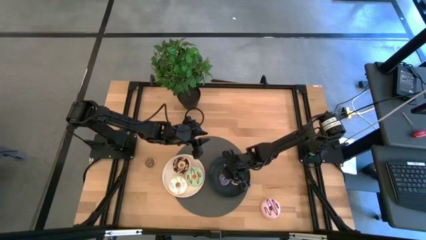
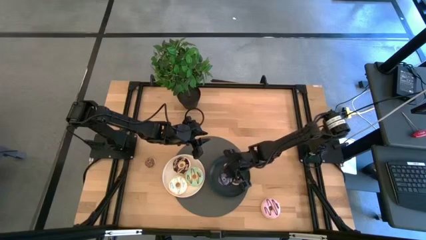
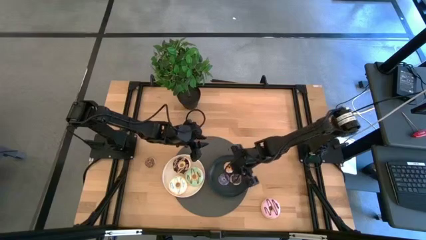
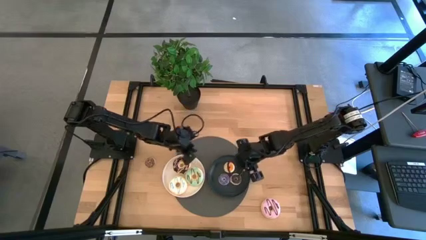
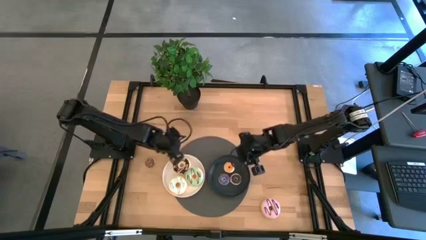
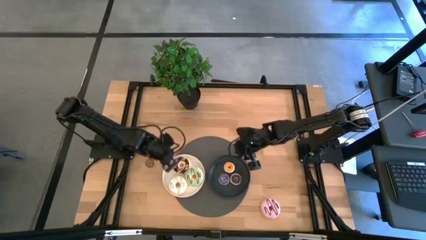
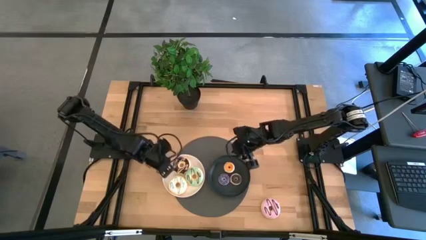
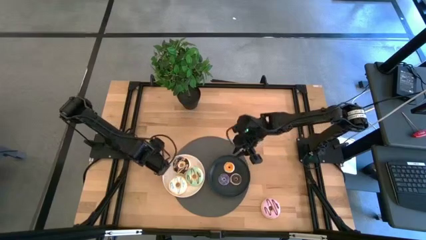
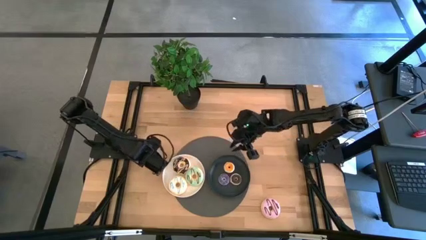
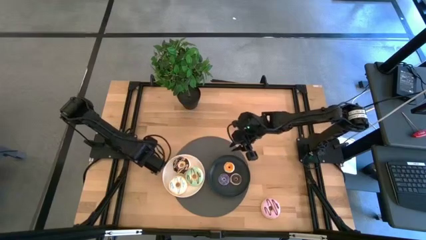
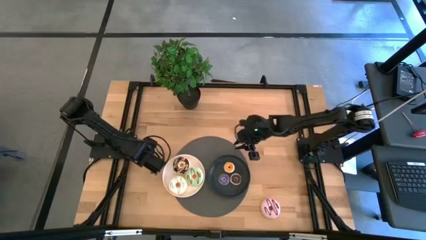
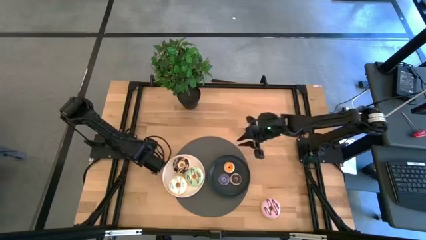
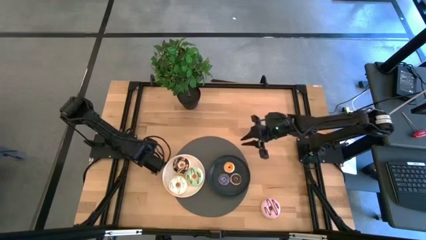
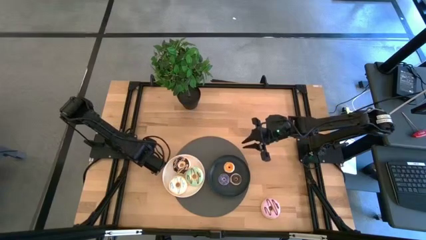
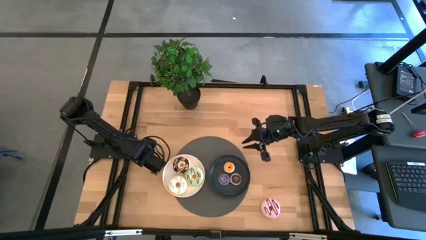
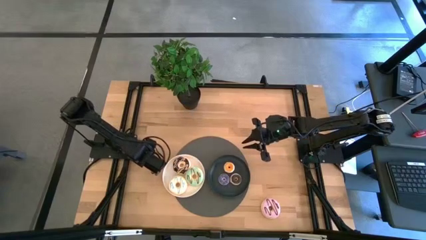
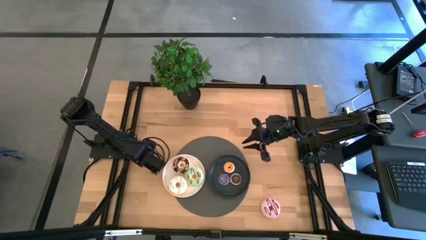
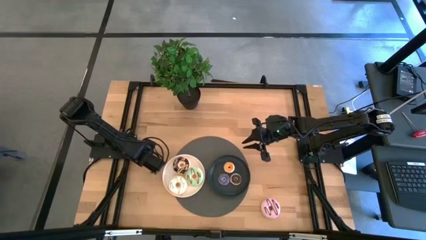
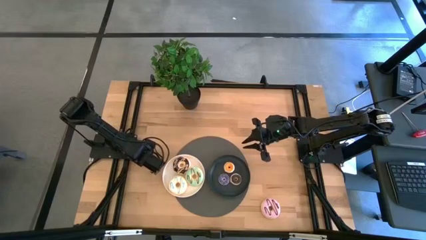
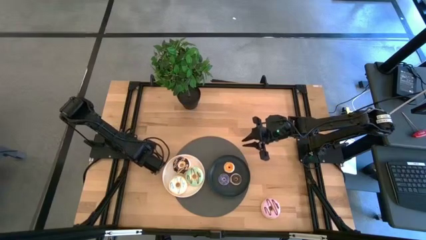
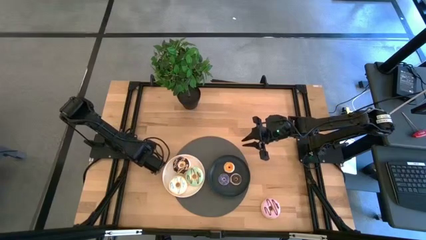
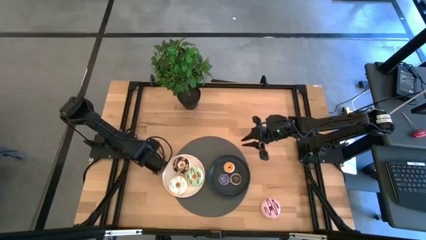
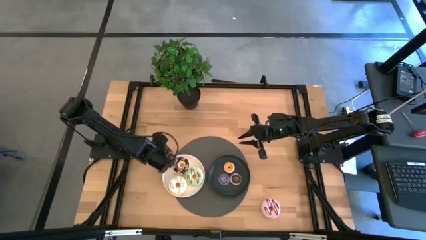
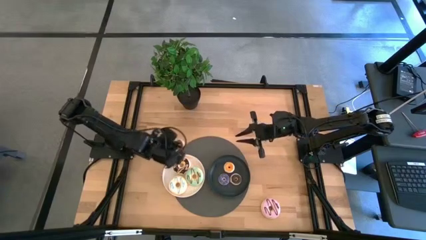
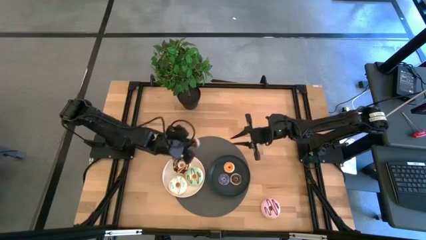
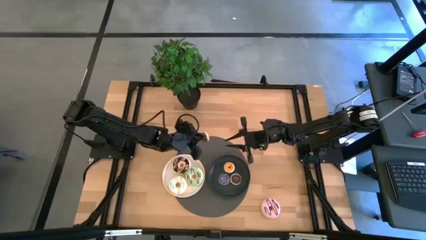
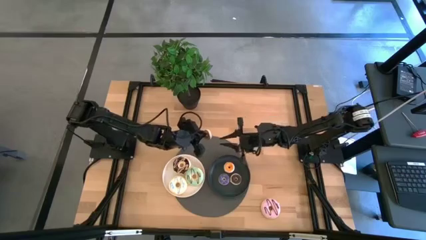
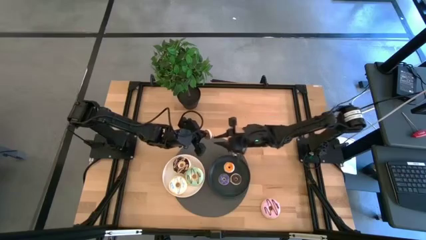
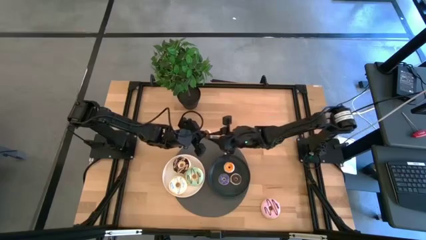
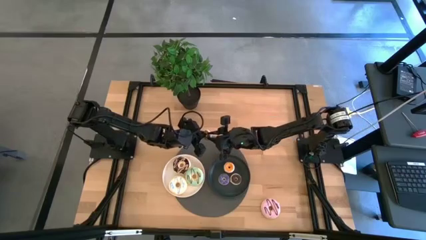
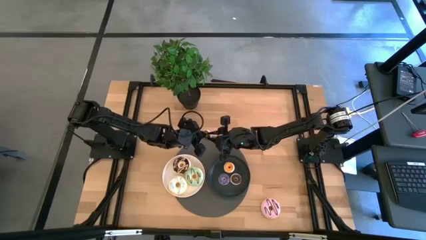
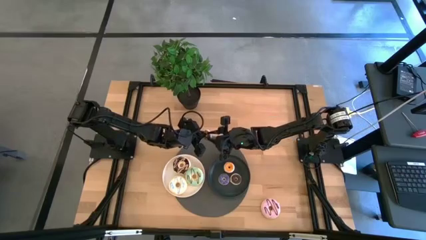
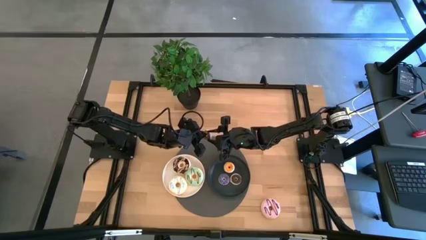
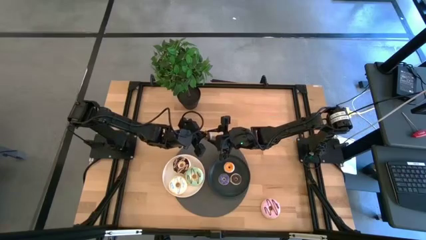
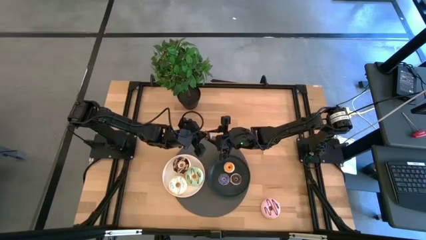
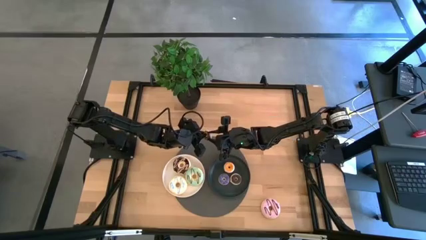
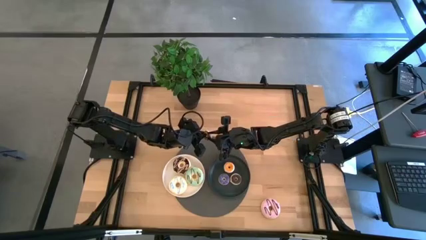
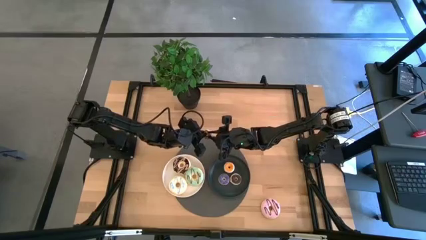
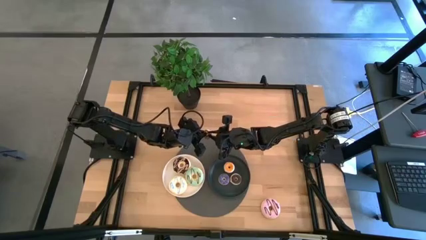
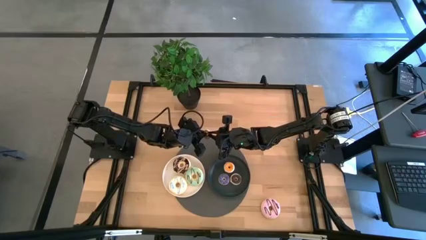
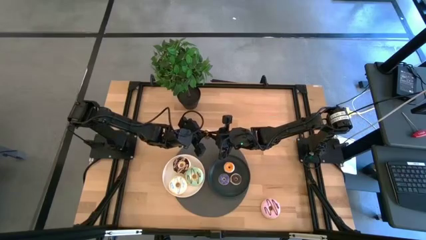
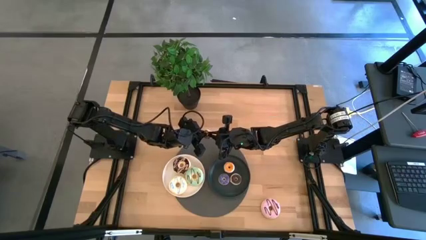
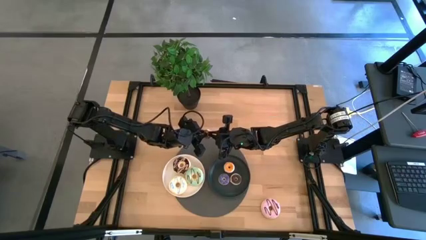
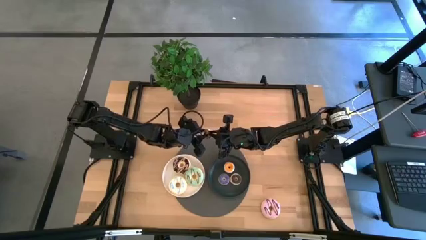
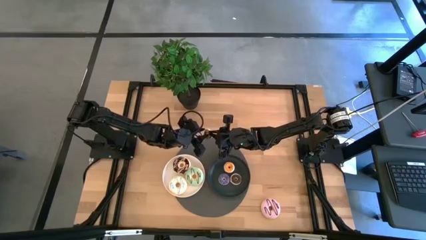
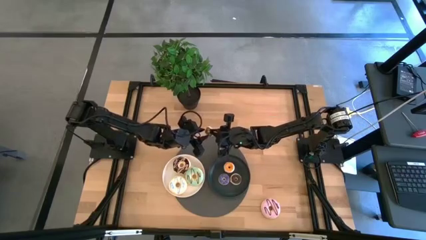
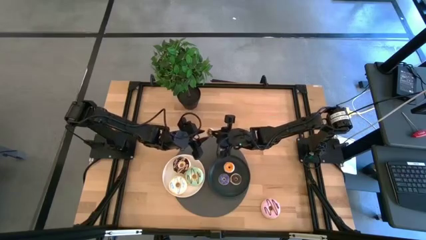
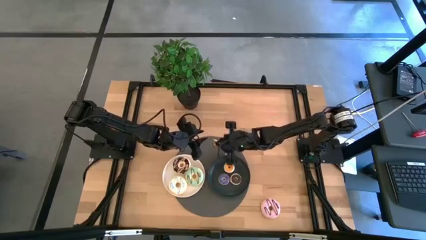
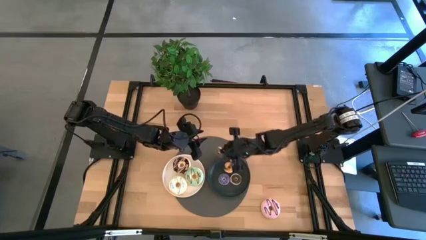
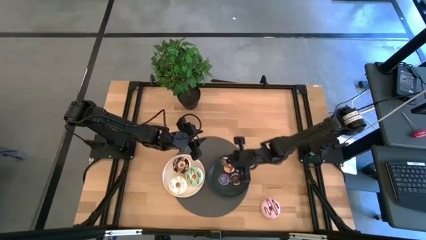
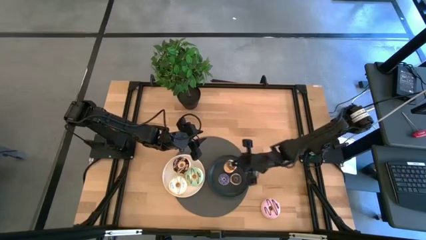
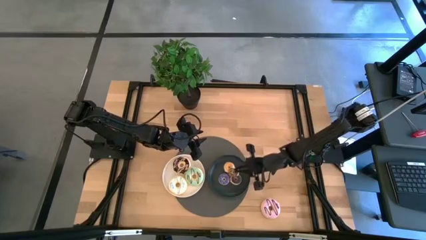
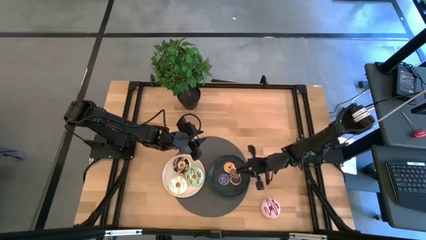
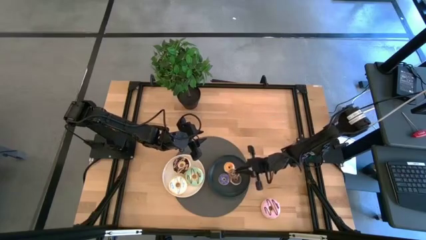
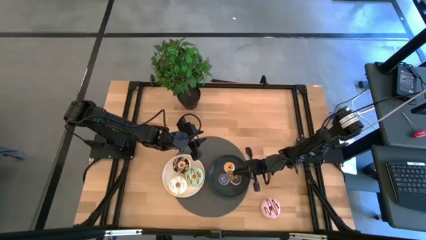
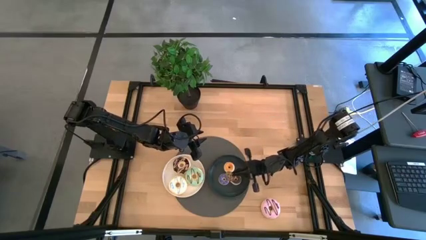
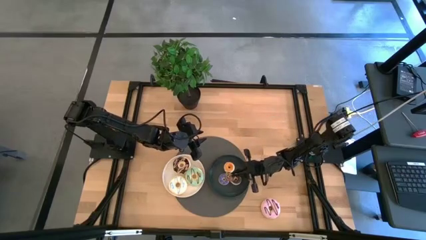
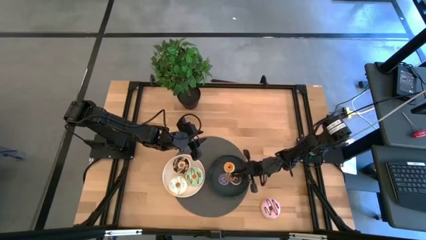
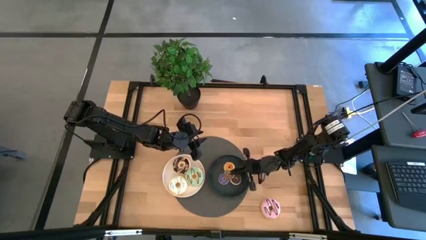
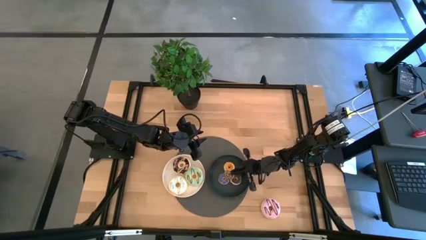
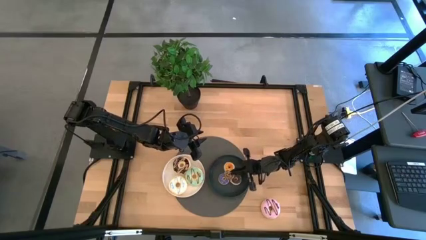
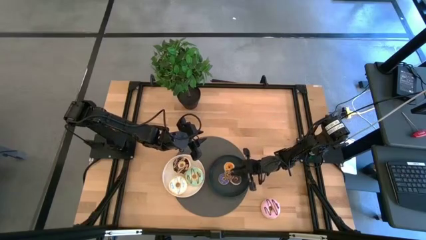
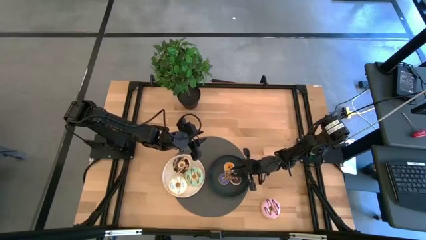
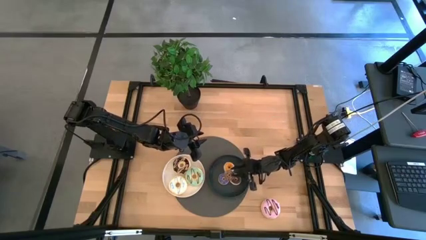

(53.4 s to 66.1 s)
Task: Pick & Place donuts
Put the small brown donut on the black plate
